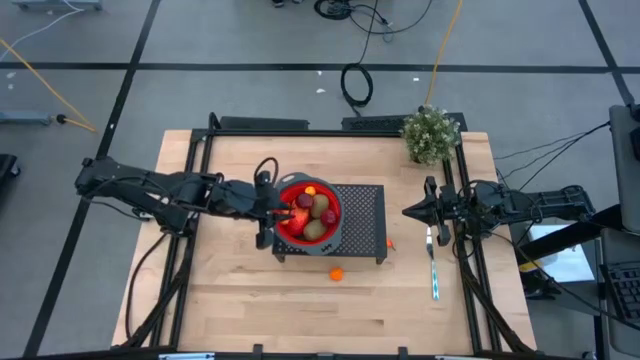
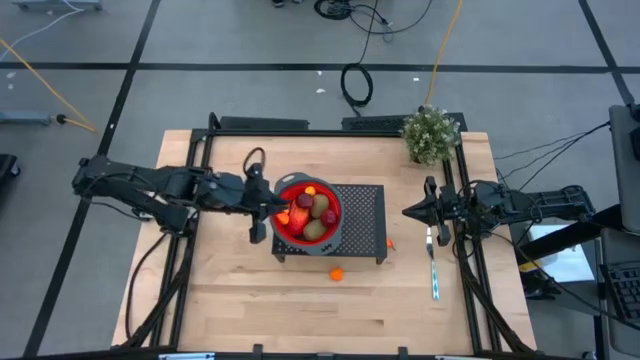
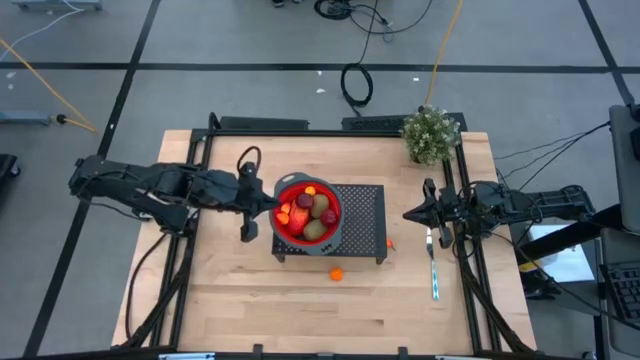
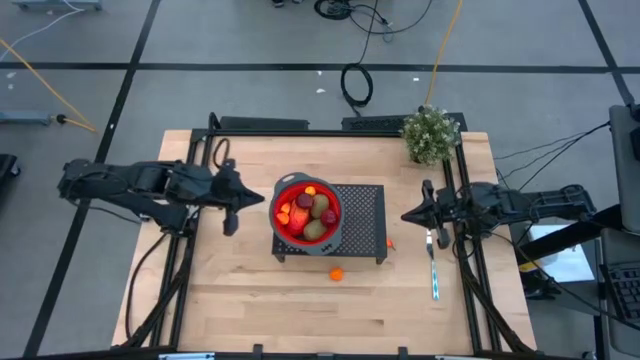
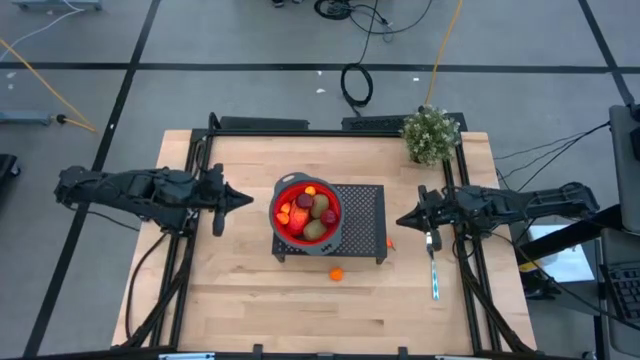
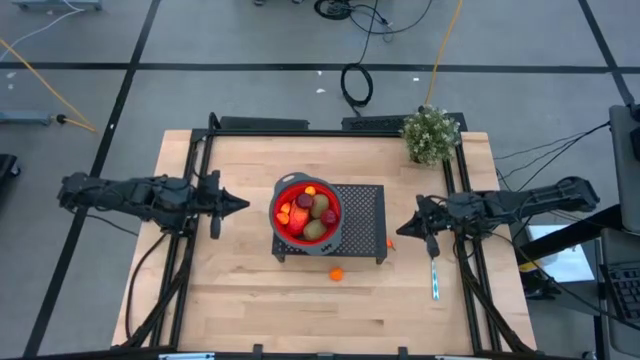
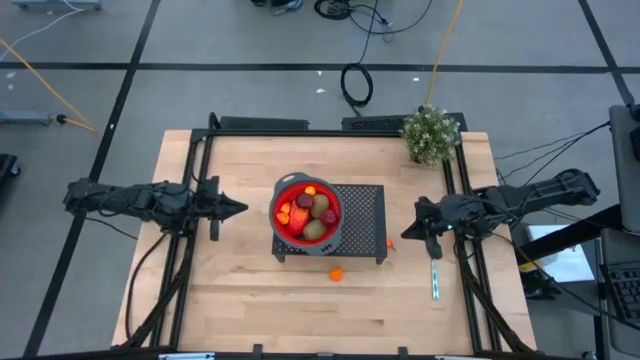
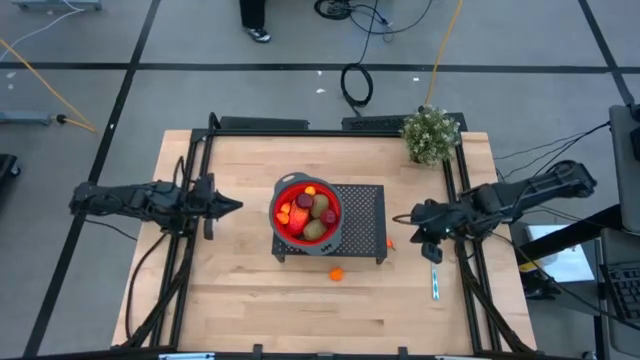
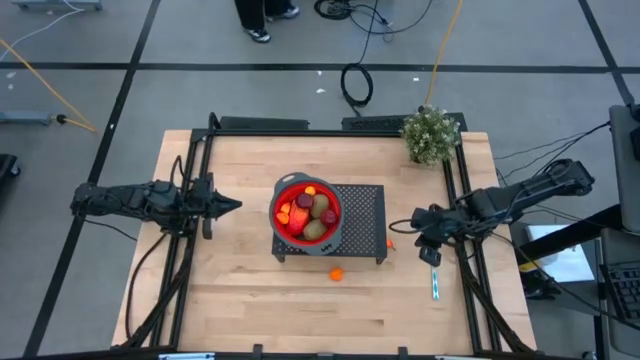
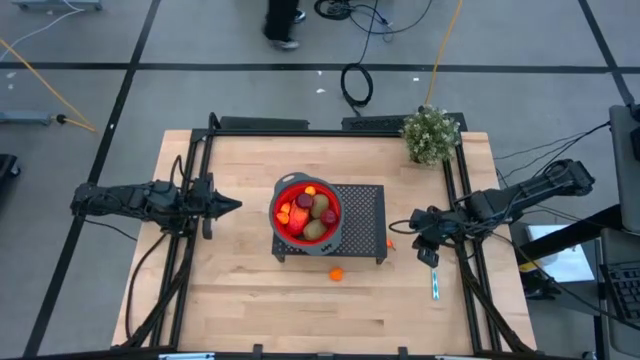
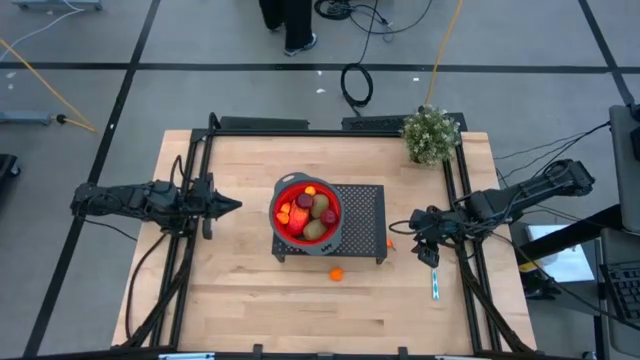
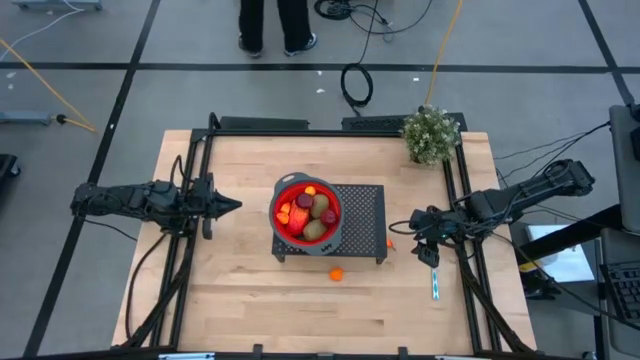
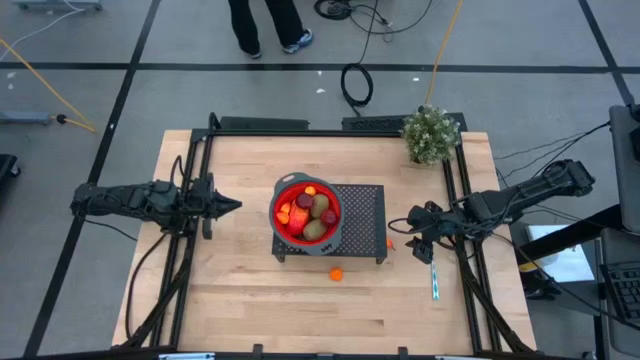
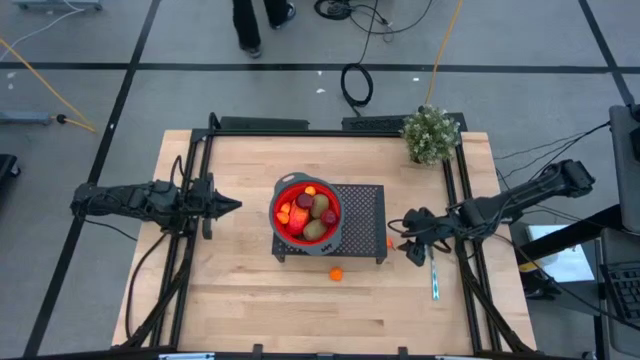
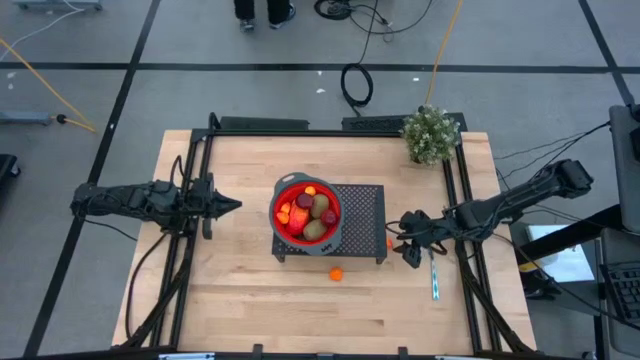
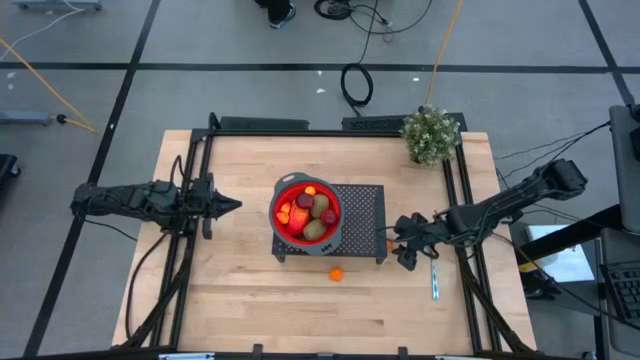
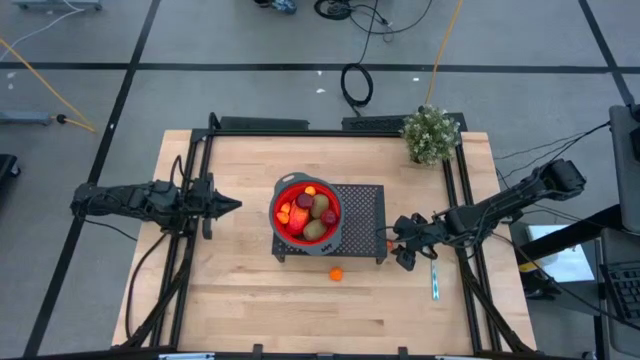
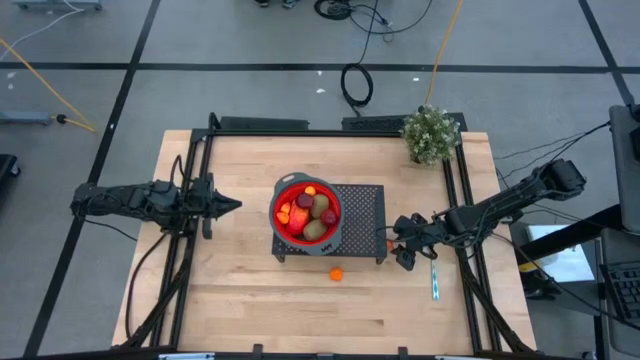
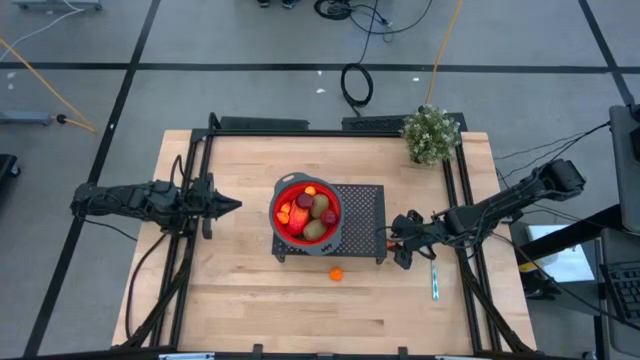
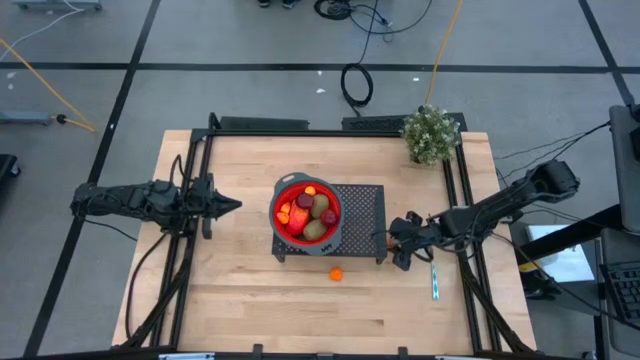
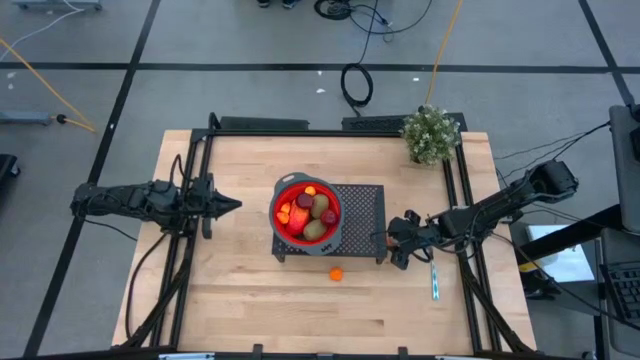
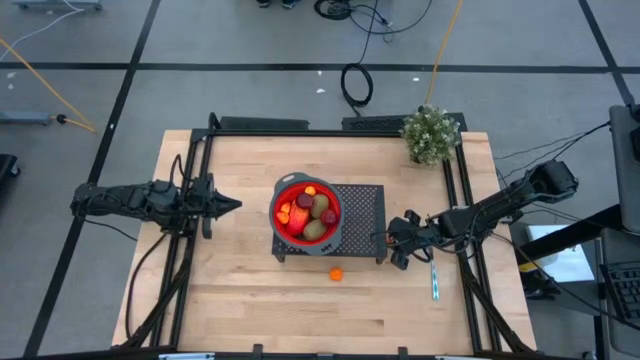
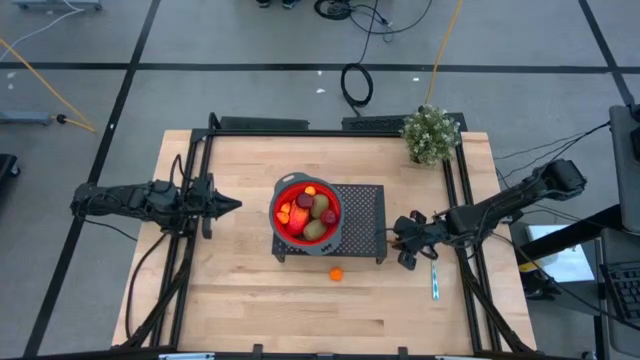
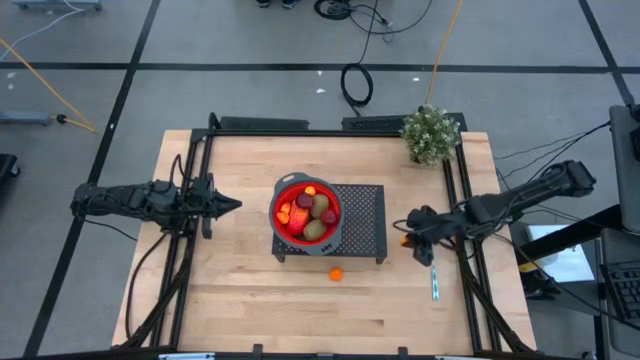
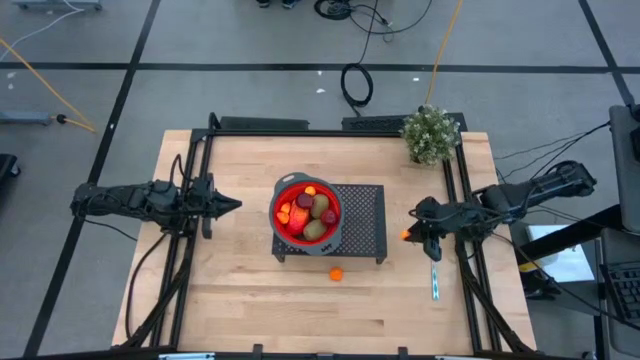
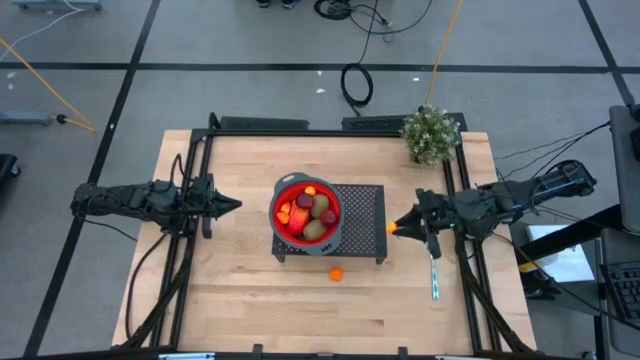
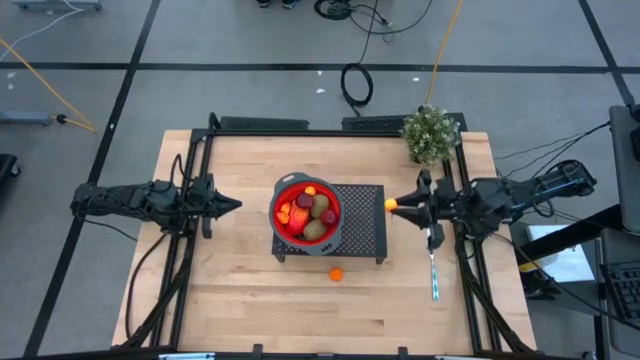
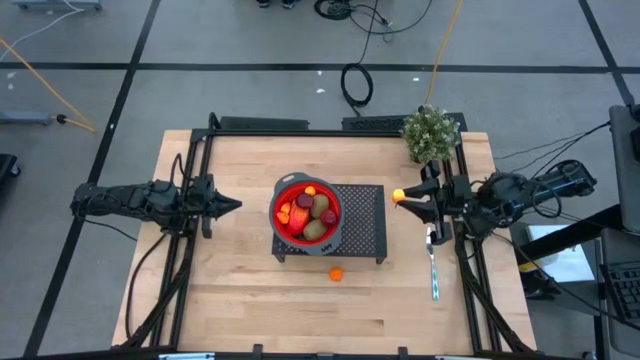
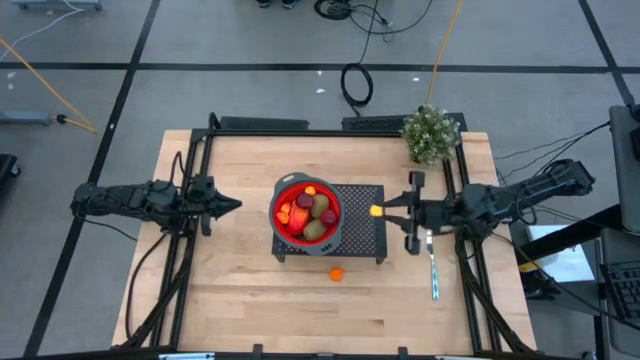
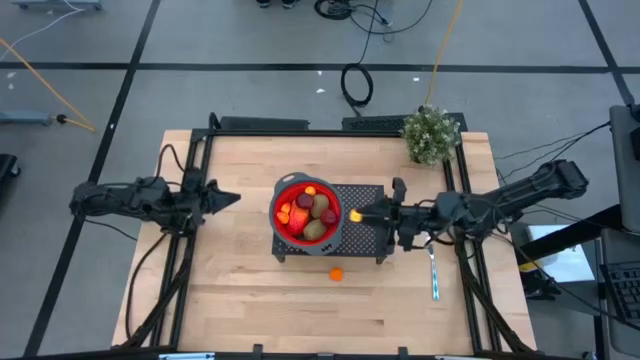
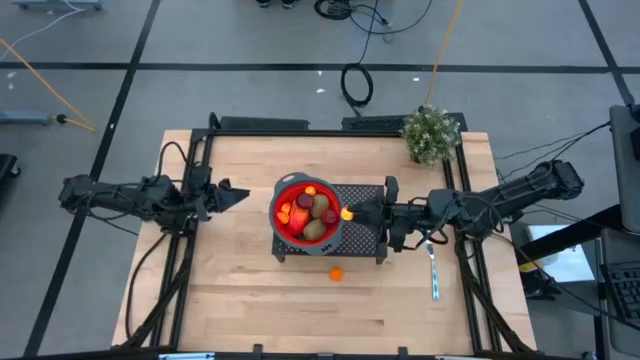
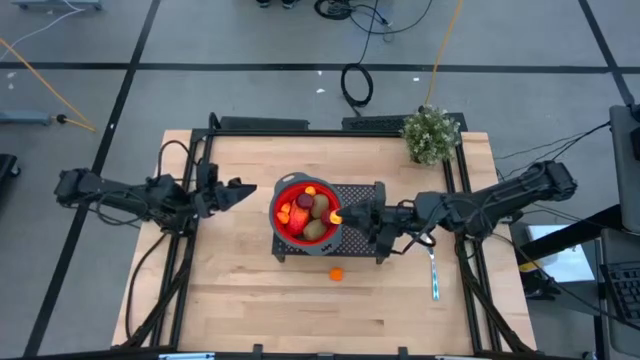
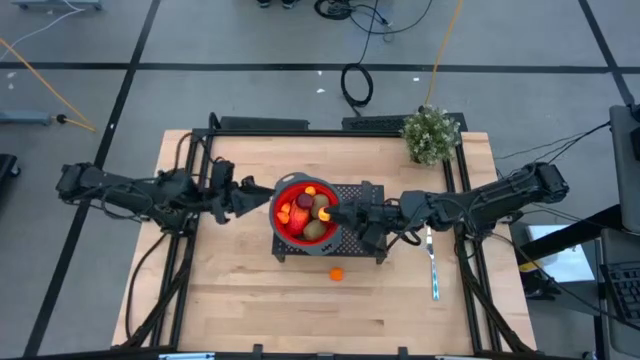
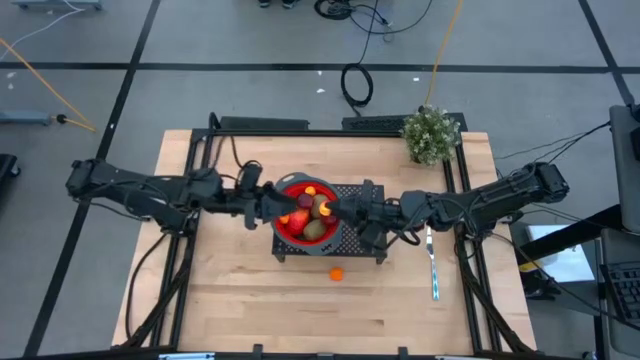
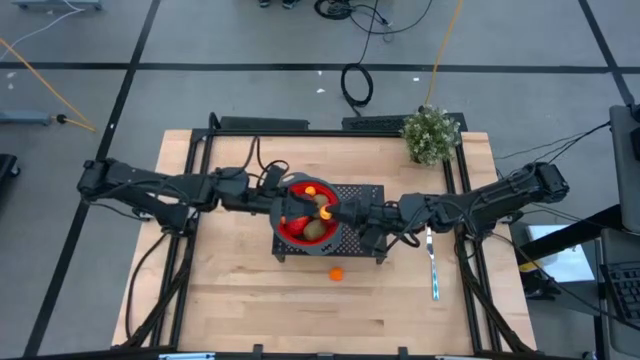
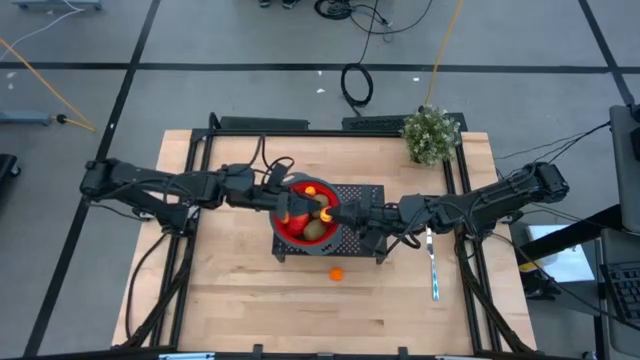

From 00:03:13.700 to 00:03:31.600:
Task: Pick & Place Fruit
Put the peach into the red colander on the shelf

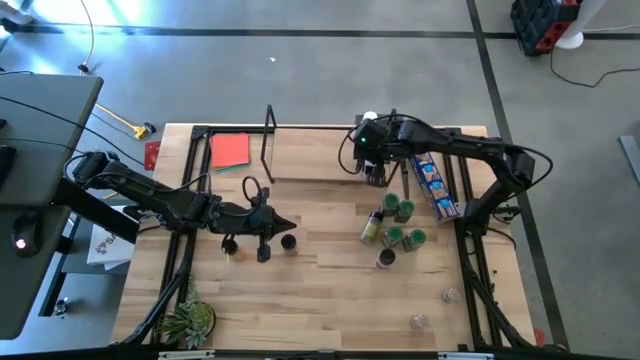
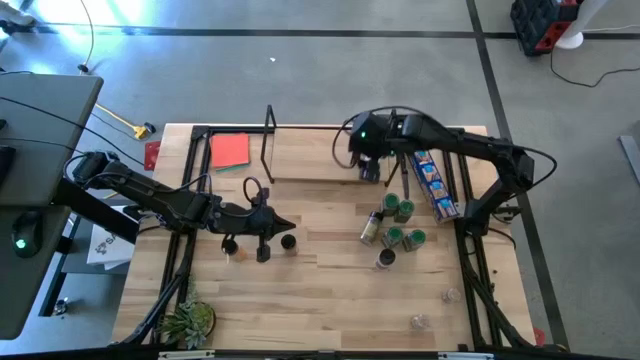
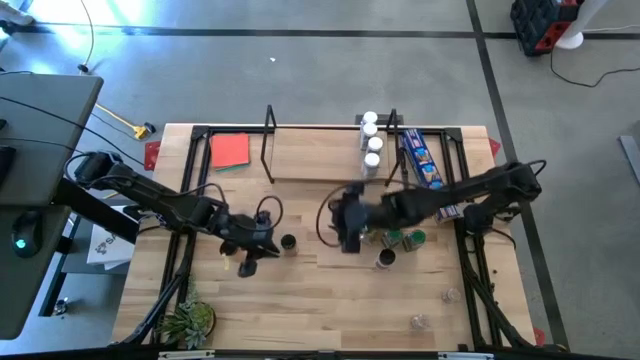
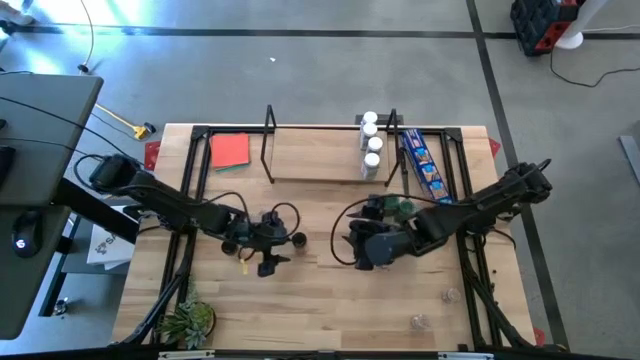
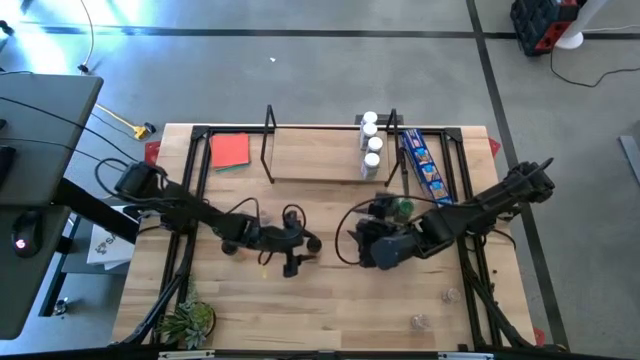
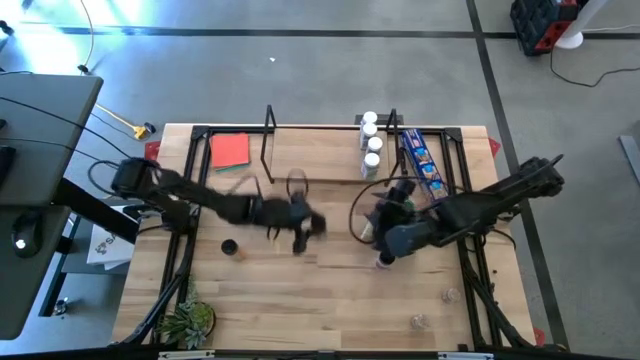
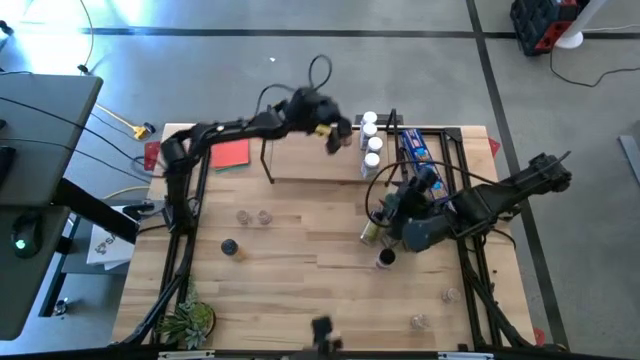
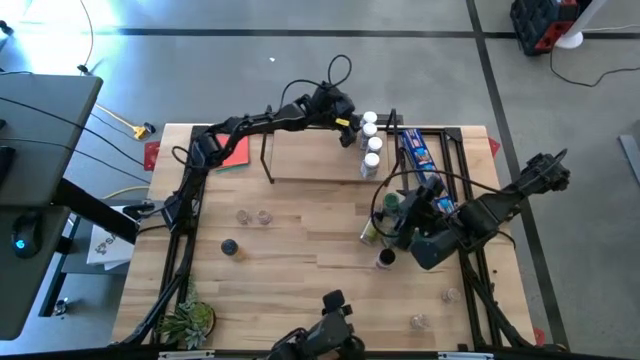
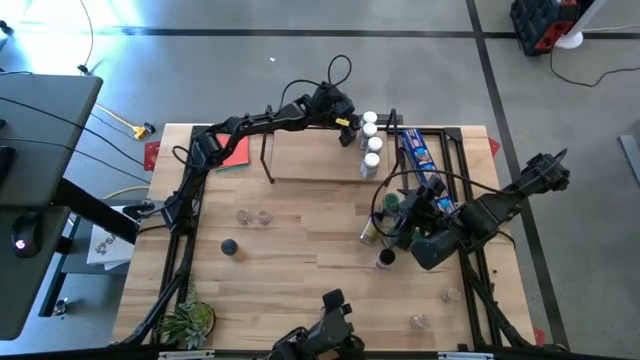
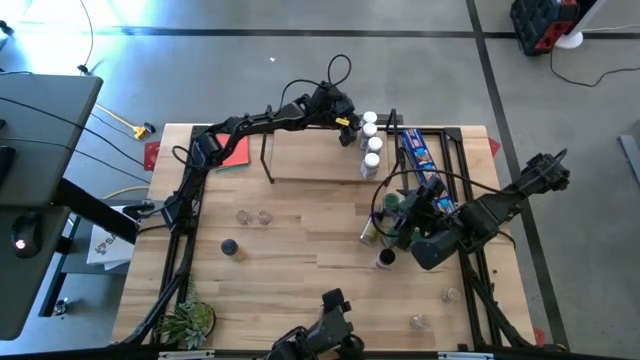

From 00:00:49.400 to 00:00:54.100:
Task: Shelf spices
Put the middle black seasoning bottle on the shelf
